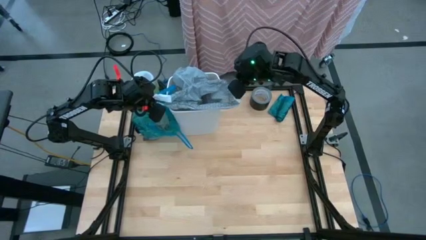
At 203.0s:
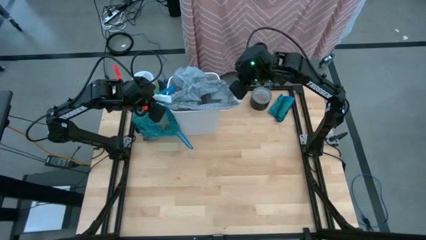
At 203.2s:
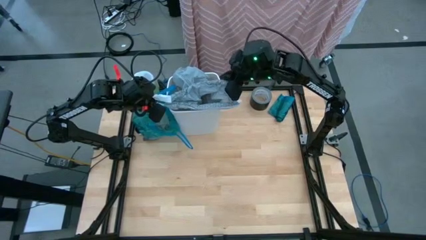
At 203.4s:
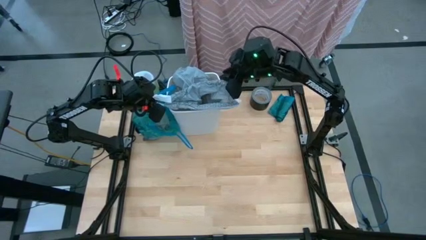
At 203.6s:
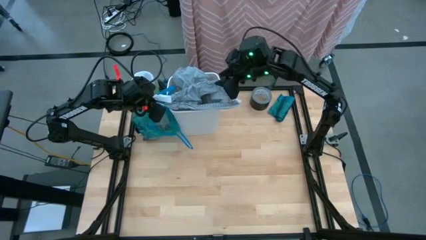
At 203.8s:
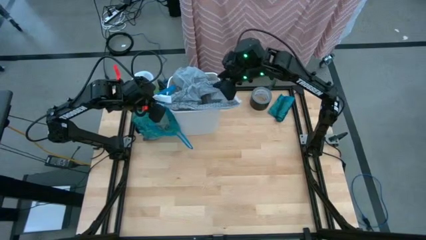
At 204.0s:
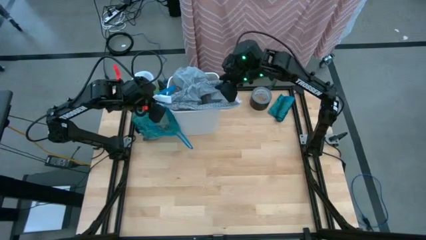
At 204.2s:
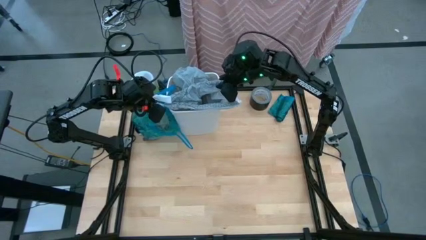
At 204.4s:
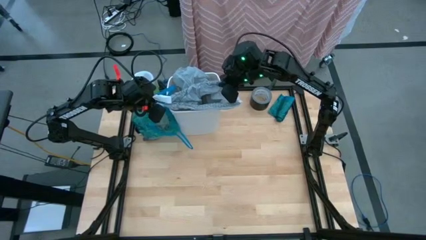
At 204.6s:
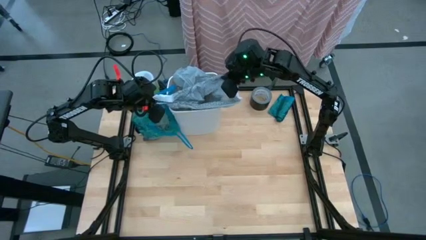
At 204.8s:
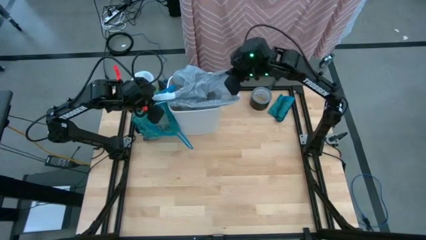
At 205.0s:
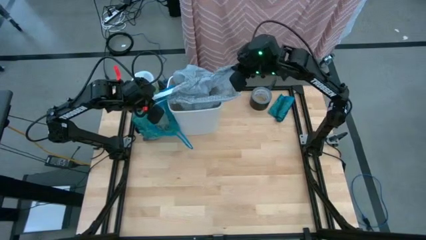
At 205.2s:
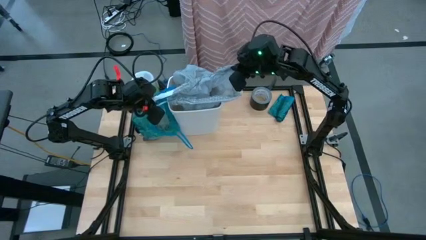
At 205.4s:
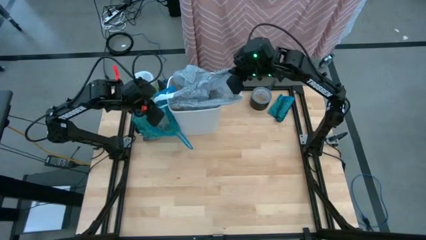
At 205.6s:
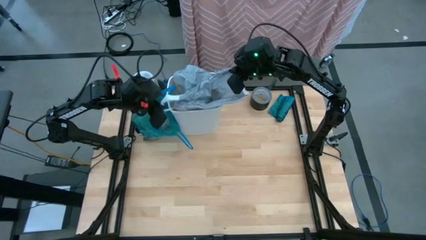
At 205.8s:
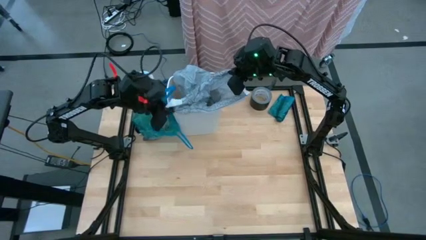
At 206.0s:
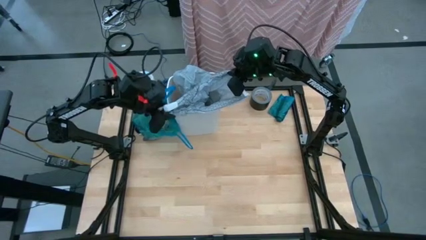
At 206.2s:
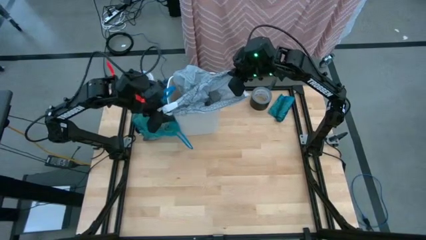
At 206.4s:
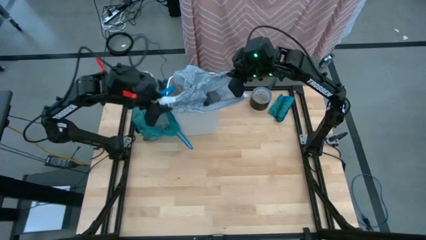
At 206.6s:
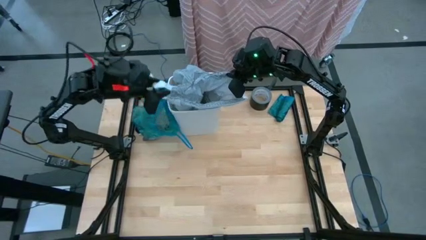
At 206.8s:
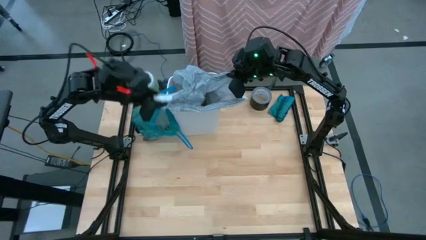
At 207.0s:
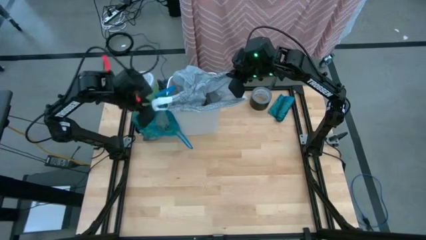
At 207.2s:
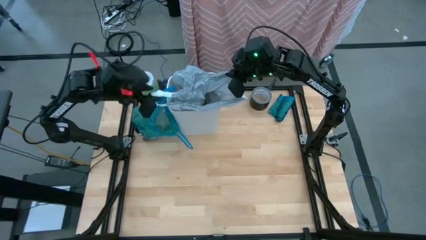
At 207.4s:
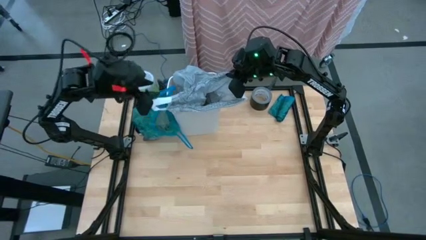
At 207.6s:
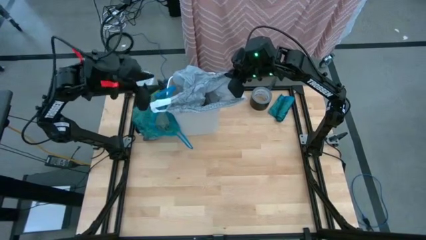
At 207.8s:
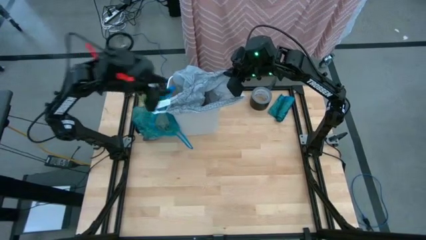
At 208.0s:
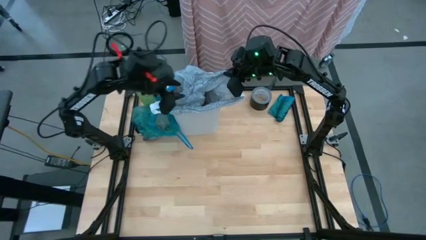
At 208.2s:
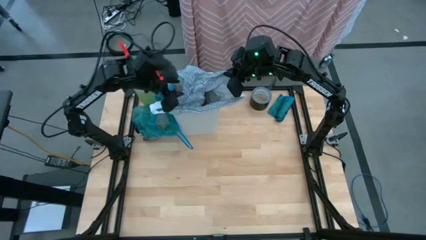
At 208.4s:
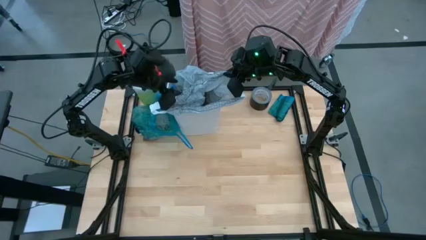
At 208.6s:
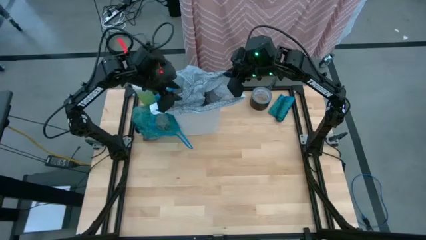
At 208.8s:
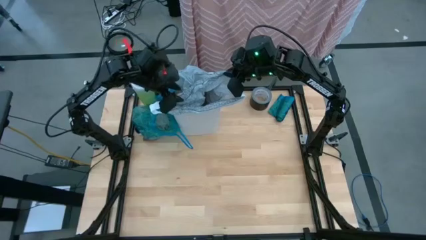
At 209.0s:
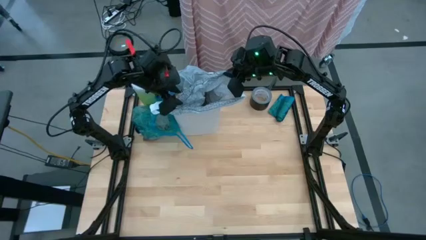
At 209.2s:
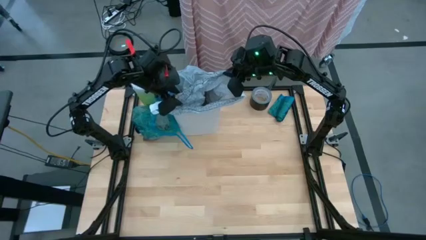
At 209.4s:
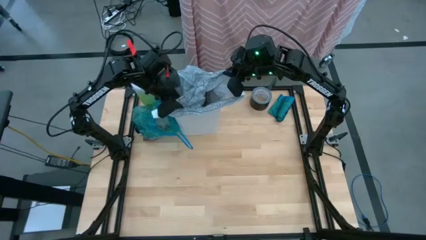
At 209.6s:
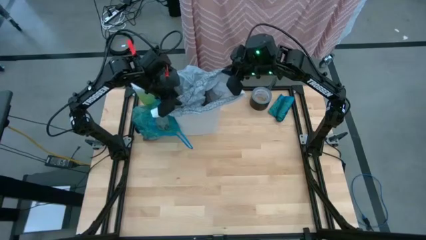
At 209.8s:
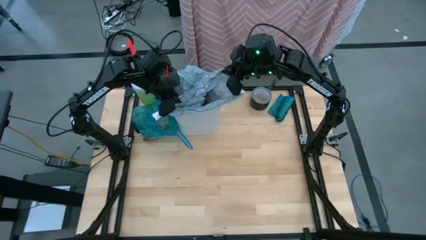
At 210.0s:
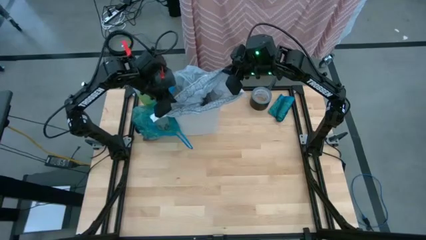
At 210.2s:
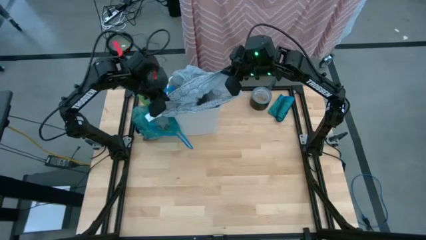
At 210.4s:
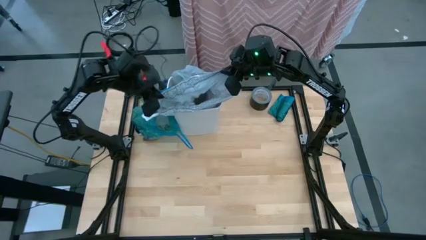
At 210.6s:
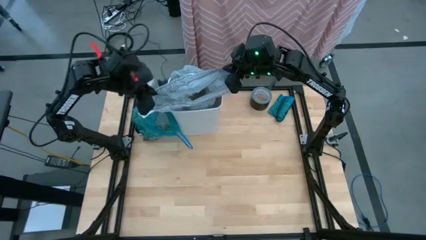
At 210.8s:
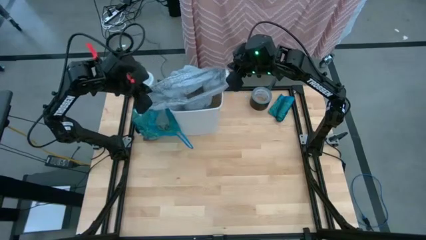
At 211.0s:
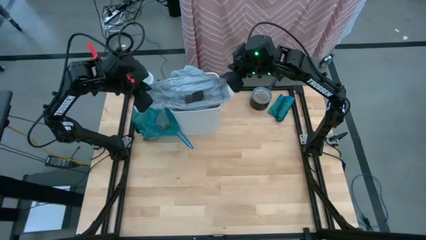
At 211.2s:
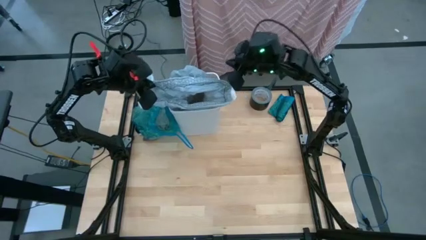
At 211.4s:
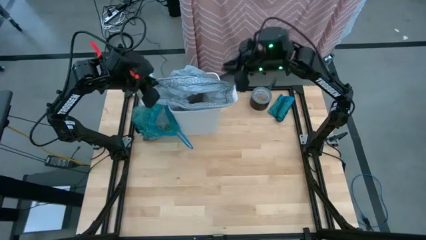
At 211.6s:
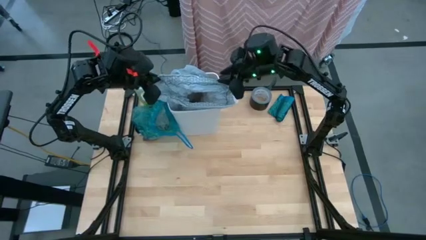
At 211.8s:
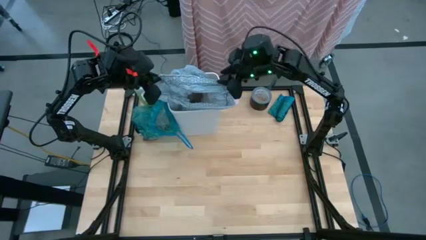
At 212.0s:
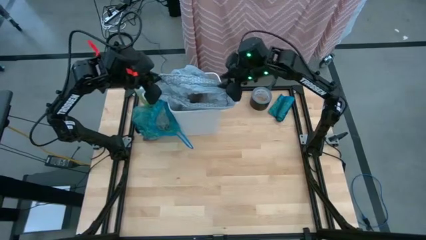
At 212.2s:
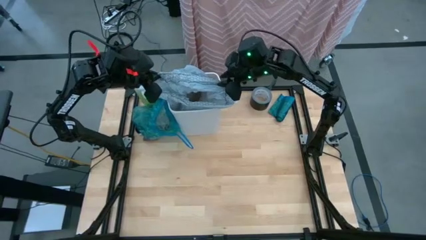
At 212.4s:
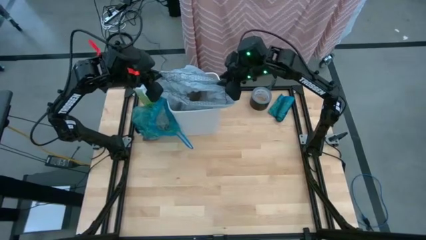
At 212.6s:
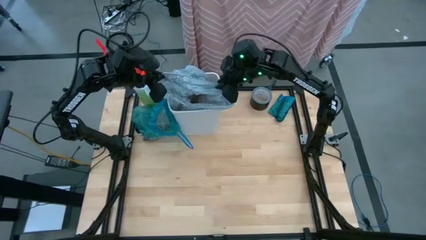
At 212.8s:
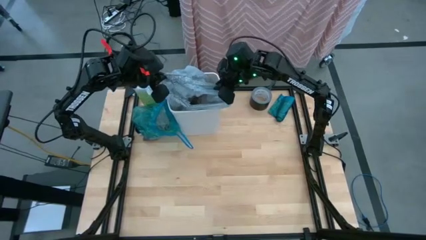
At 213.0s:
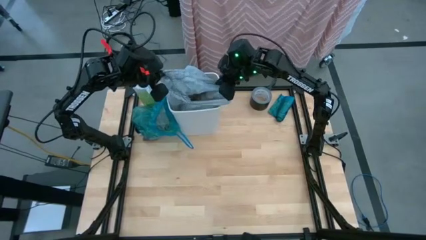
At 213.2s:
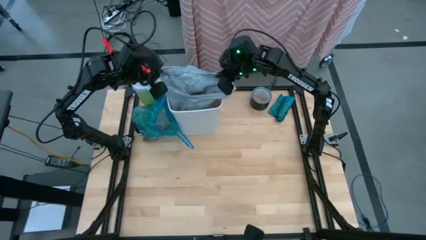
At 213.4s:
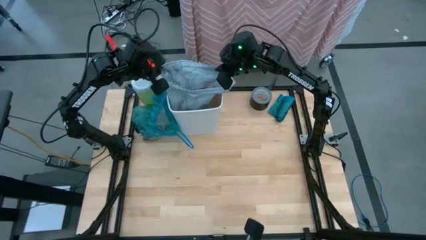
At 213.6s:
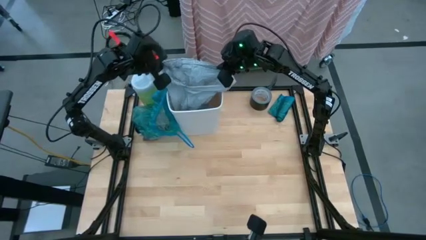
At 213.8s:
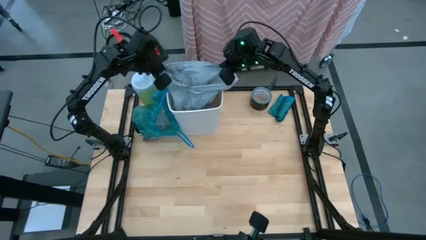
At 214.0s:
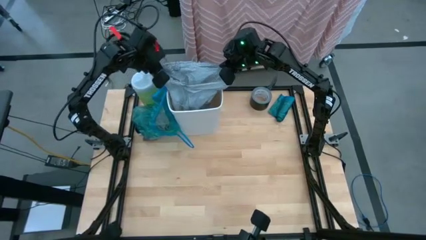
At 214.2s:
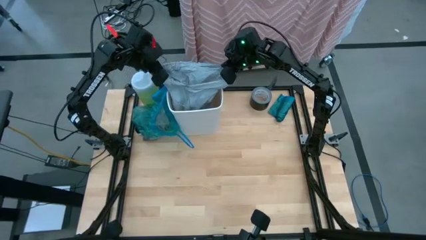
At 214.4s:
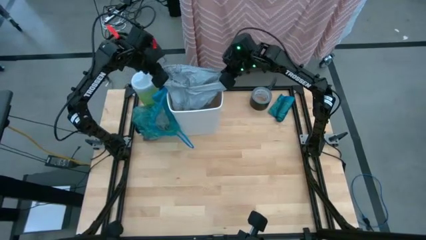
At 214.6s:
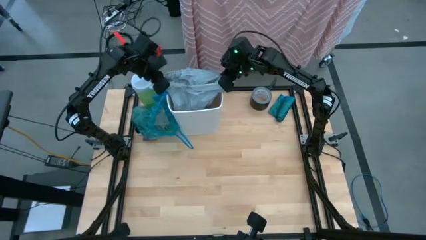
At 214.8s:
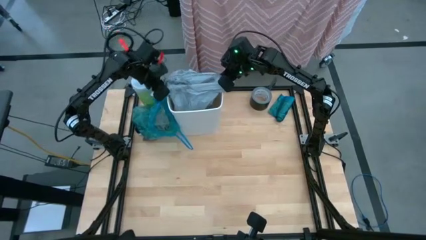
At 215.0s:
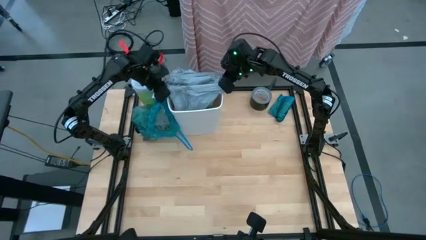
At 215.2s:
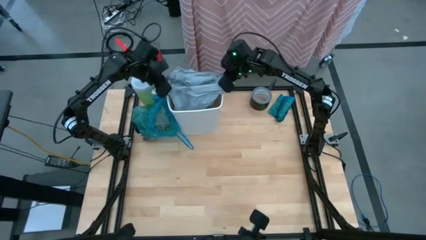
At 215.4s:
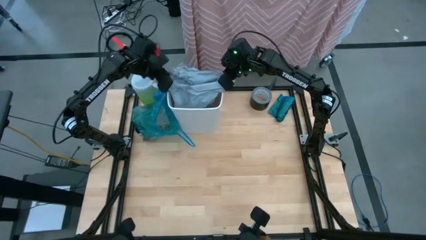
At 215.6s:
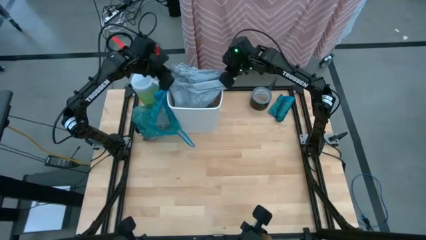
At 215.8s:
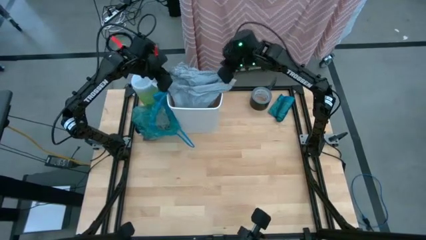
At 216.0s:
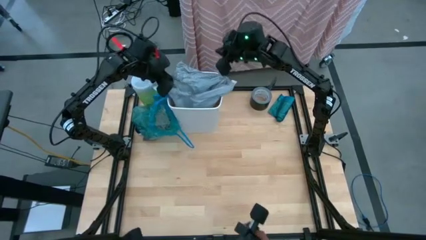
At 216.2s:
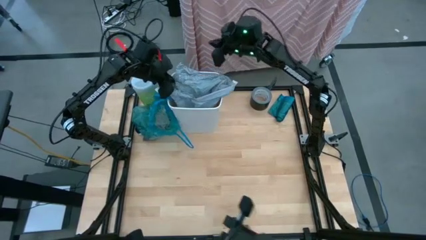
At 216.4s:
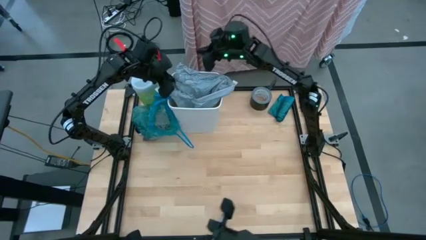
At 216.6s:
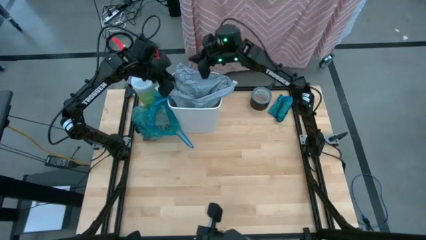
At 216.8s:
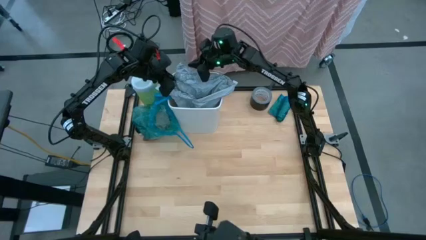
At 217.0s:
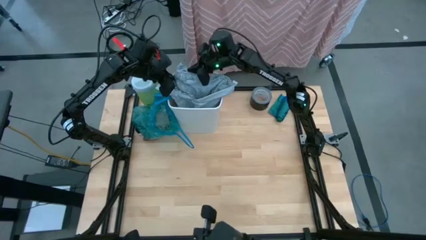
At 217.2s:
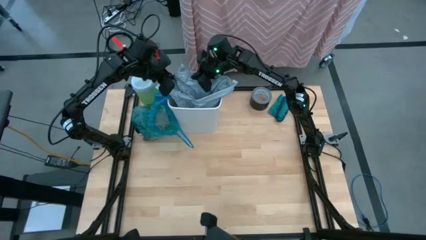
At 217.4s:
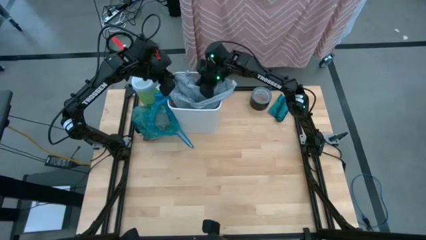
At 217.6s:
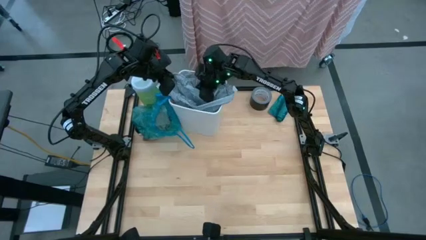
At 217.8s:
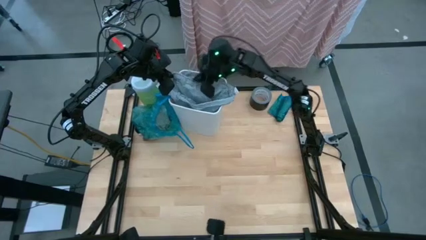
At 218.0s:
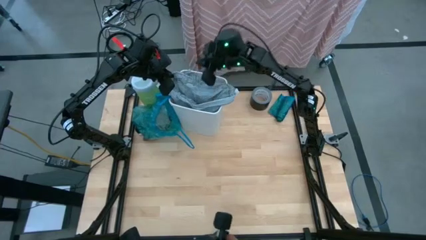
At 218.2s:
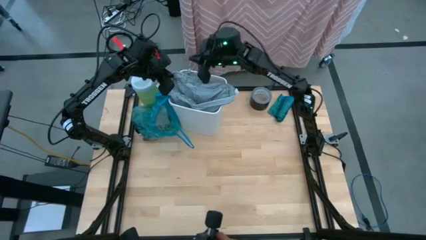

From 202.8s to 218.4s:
Task: place trash/remove bag and relplace
Insert the gray trash bag into the trash bin

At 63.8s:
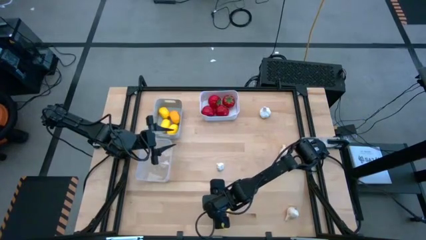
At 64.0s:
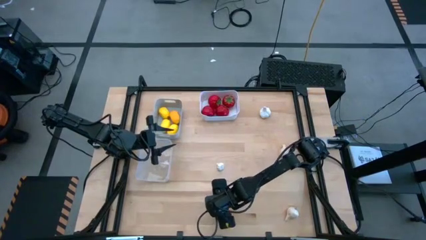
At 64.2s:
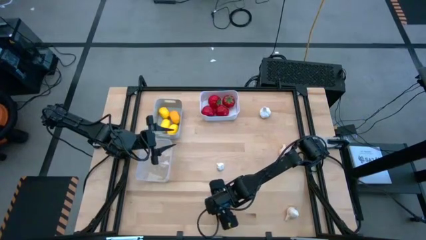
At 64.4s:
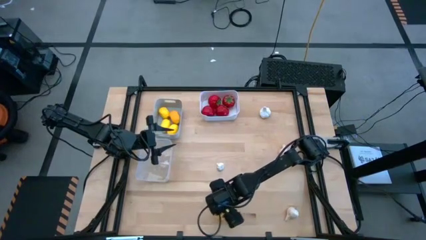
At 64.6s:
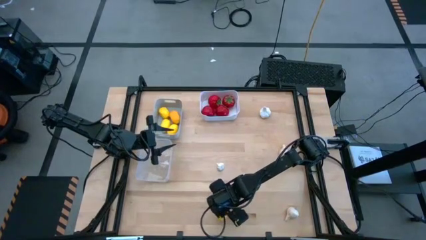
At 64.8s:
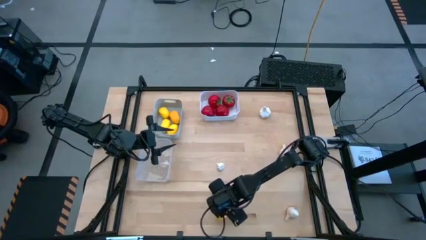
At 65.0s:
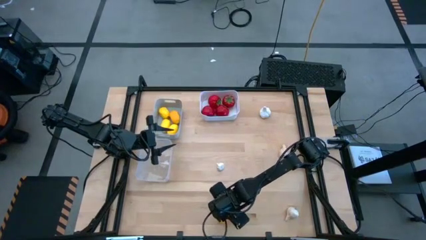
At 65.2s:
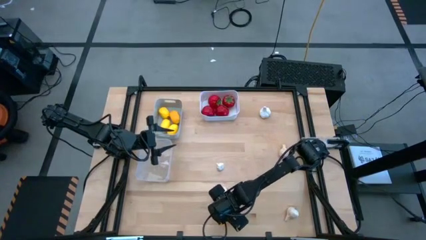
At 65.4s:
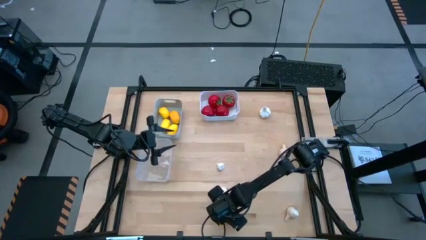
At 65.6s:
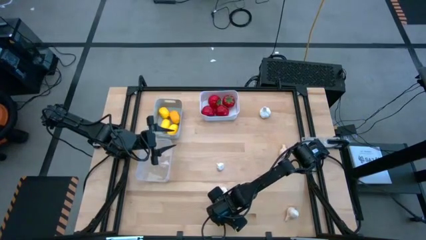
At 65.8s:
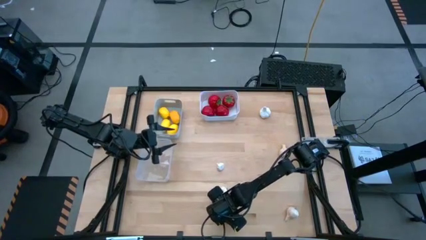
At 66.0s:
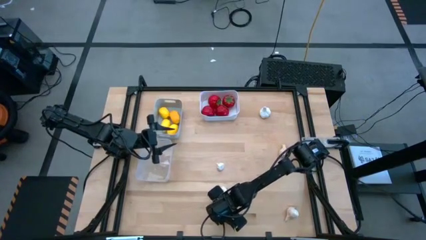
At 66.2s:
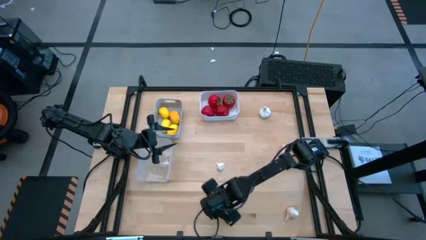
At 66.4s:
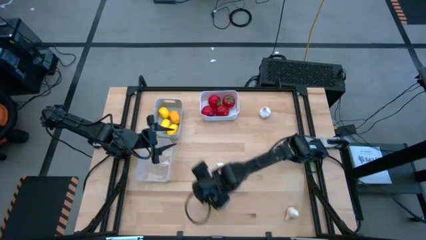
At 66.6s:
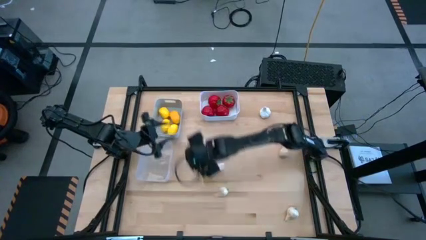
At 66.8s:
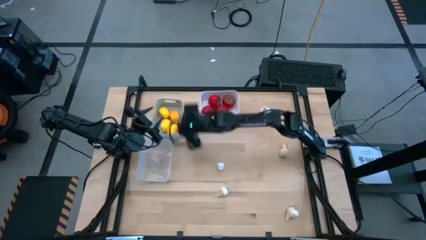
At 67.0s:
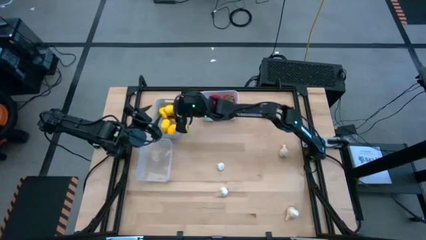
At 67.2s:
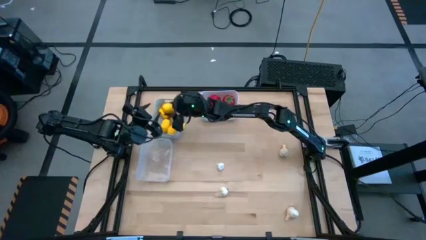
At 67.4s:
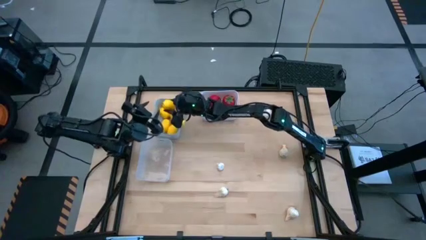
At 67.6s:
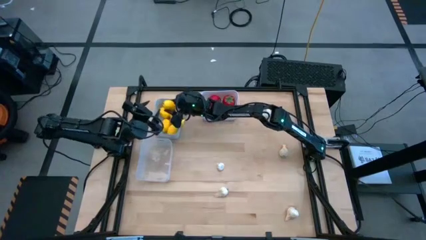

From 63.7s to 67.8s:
Task: Sort produce into baskets
Put the yellow lemon into the gray bin
